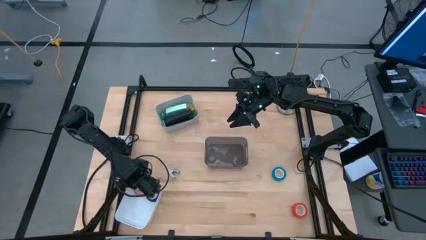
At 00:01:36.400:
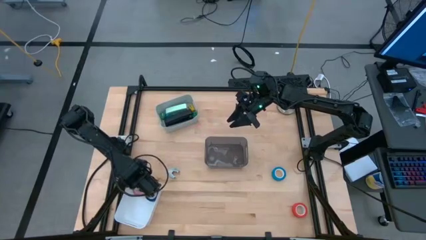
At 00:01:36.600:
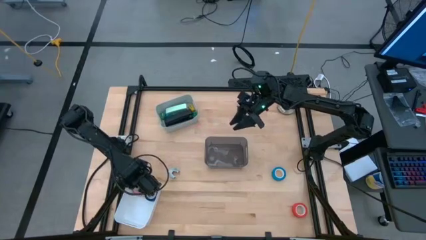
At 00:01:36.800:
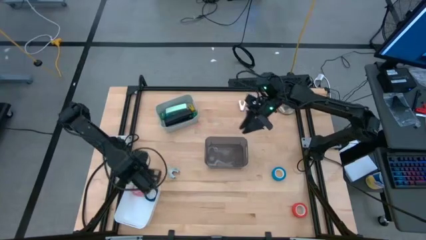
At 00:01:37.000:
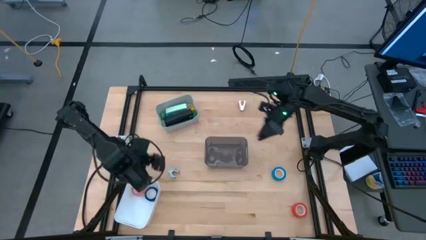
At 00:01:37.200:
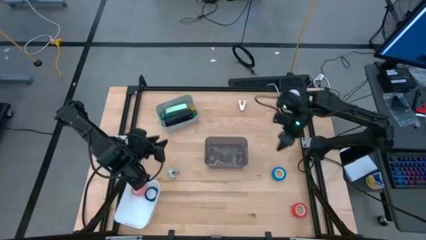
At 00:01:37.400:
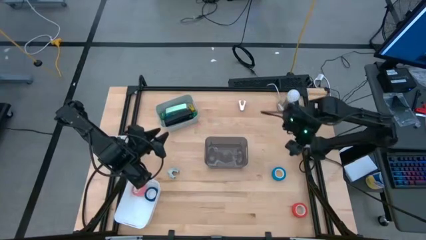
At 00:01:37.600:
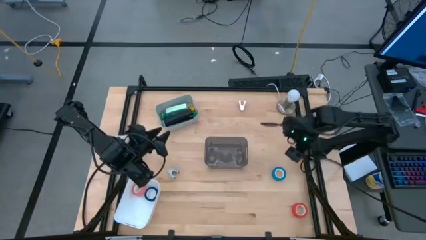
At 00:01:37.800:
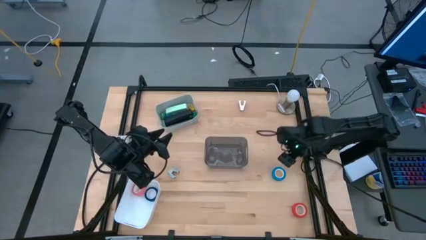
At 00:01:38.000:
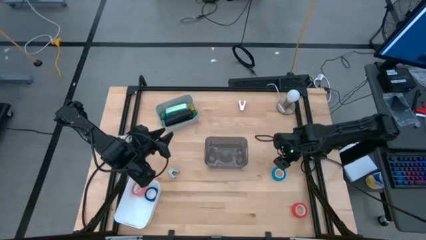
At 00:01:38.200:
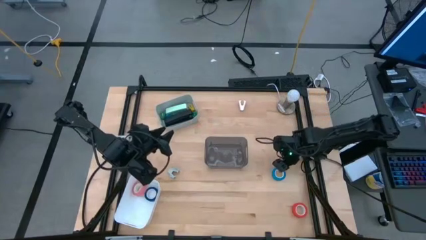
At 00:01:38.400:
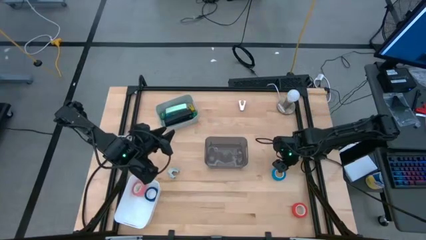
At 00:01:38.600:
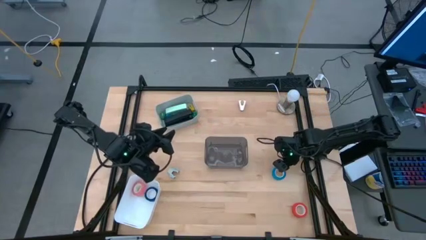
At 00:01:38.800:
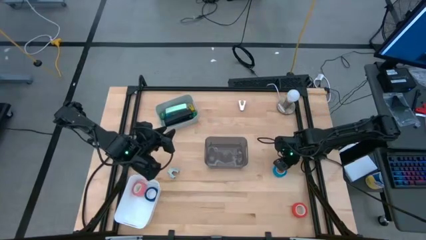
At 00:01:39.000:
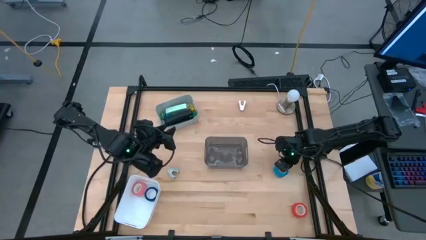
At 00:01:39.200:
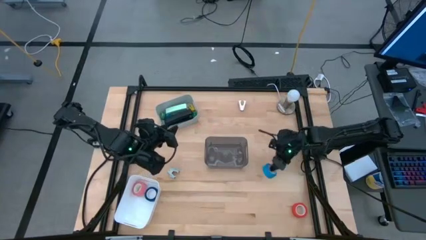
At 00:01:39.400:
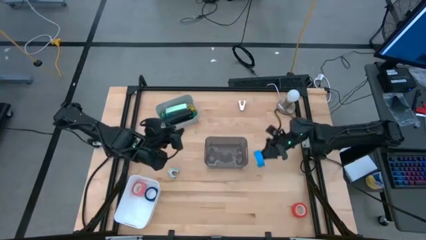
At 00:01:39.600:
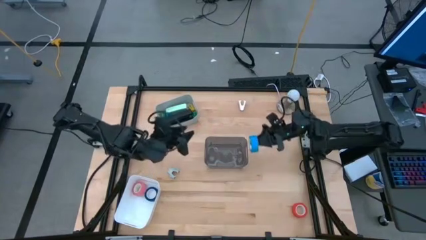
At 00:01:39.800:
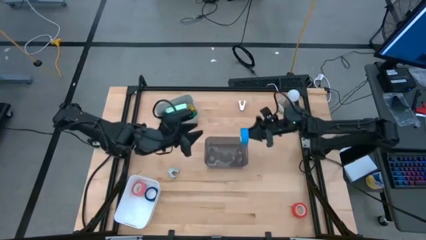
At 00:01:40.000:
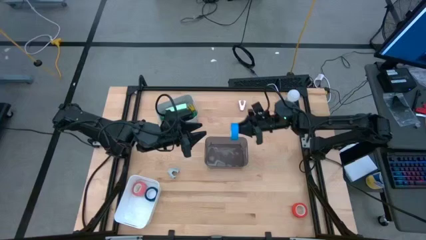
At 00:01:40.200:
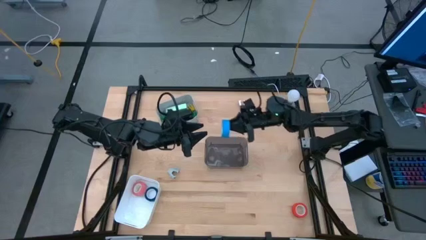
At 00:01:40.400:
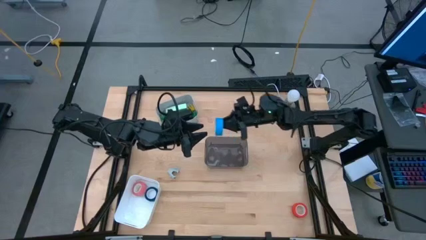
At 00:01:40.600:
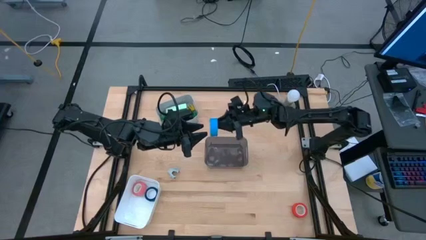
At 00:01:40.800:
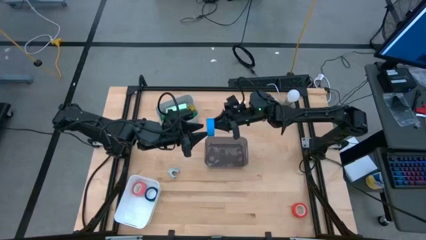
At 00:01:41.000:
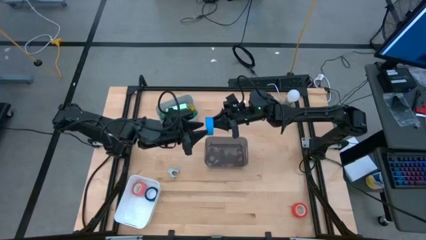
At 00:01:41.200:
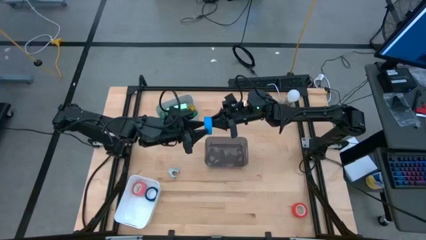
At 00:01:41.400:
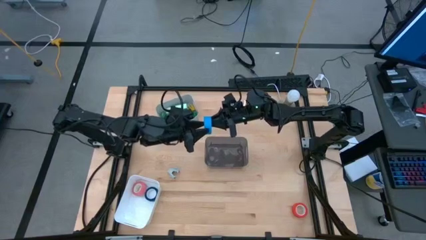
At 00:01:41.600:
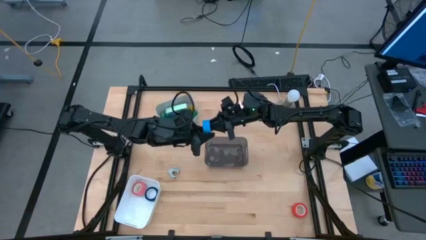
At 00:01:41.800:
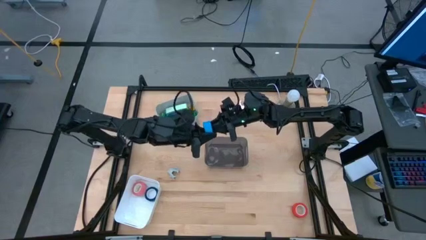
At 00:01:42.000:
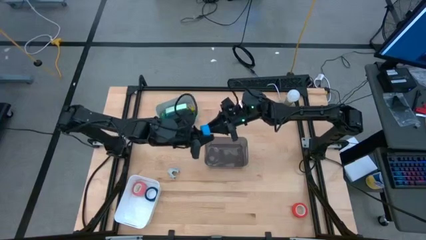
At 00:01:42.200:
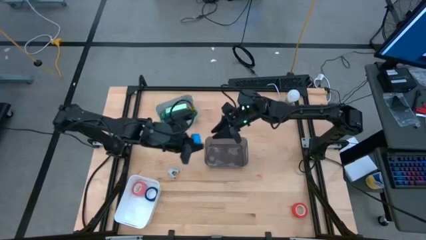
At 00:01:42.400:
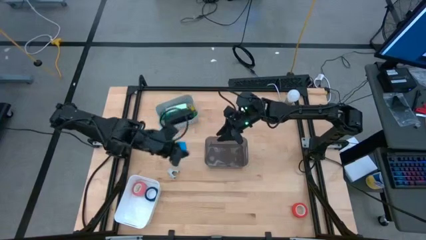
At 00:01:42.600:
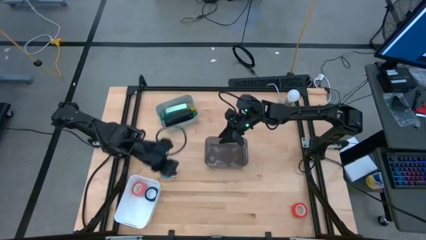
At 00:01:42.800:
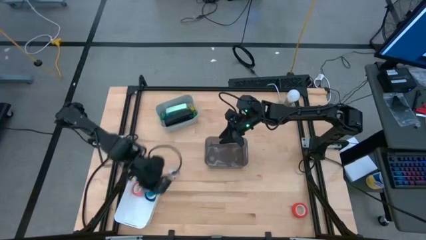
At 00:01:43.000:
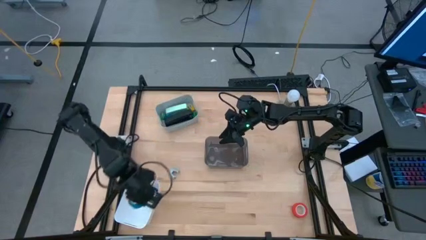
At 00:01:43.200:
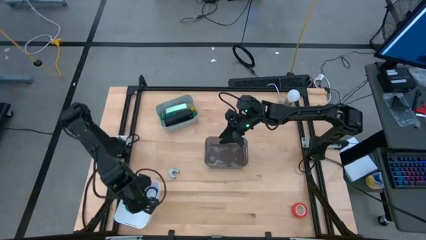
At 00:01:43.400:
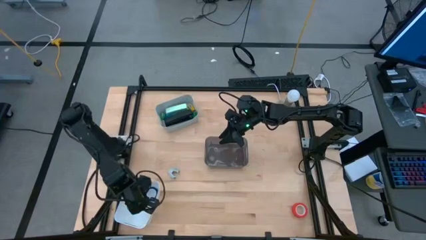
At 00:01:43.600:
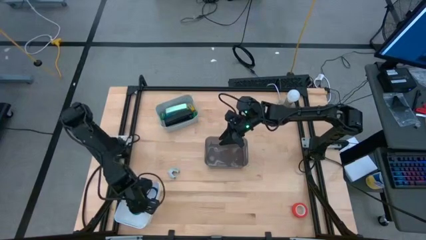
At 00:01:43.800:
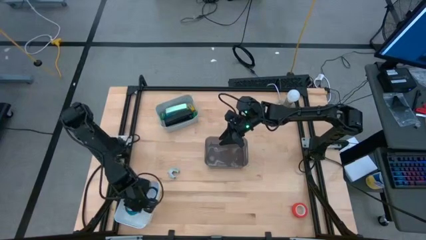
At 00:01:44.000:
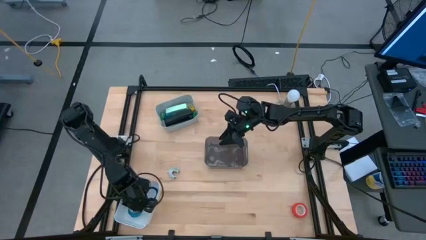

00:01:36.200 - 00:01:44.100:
Task: Pick and place Stapler, Stapler remover, tape
Put the light blue tape into the white bin

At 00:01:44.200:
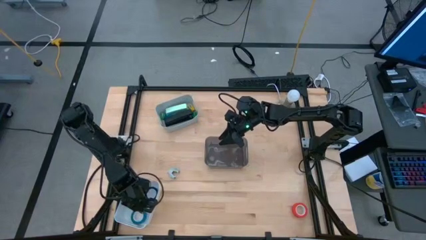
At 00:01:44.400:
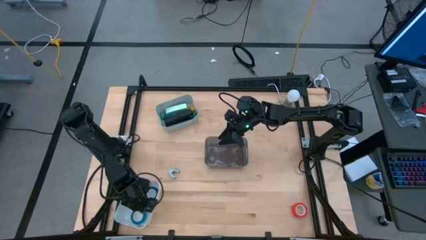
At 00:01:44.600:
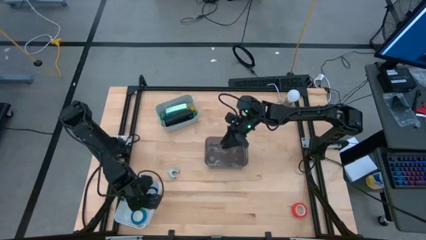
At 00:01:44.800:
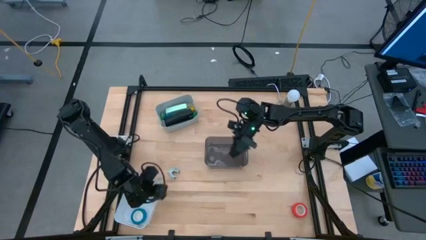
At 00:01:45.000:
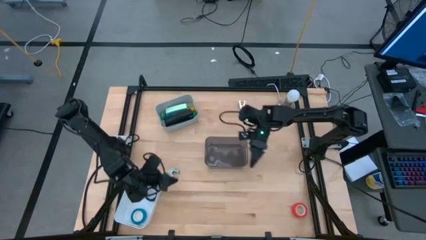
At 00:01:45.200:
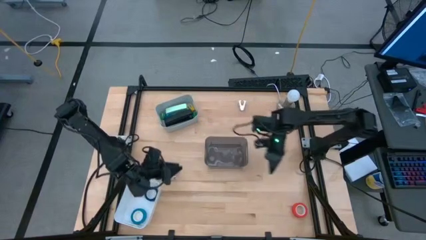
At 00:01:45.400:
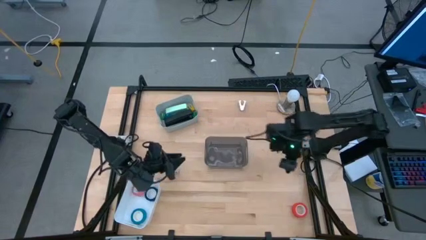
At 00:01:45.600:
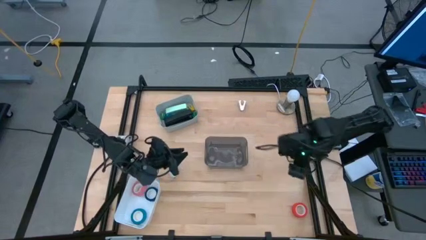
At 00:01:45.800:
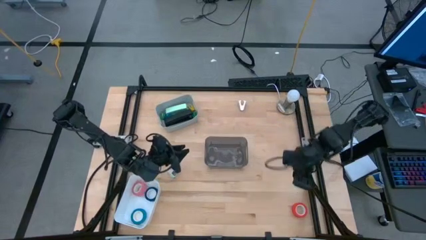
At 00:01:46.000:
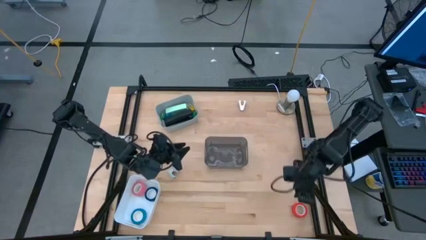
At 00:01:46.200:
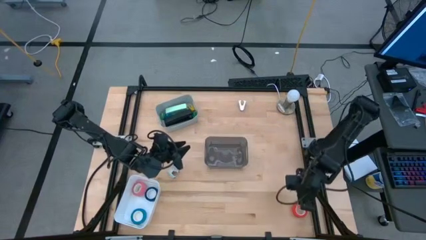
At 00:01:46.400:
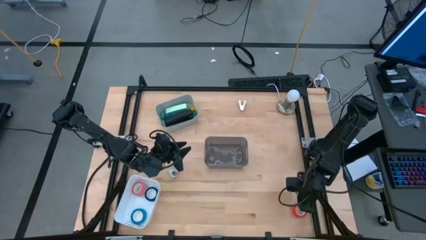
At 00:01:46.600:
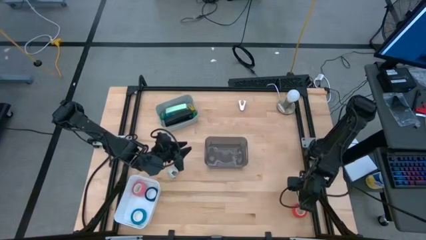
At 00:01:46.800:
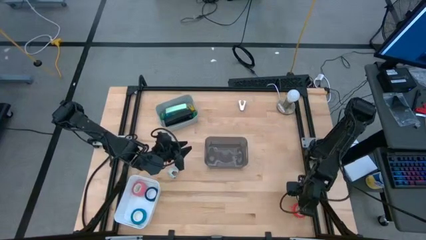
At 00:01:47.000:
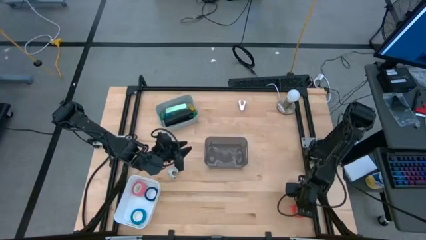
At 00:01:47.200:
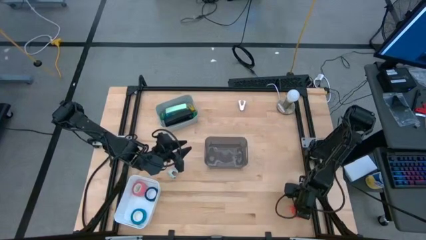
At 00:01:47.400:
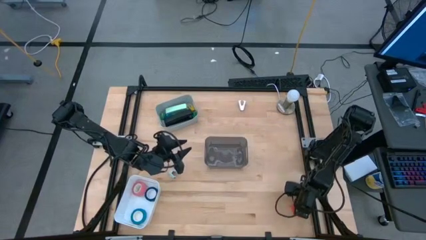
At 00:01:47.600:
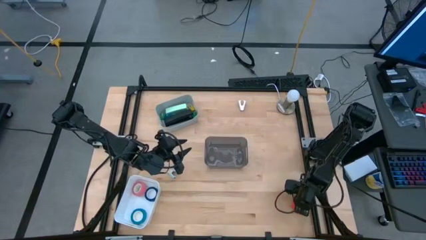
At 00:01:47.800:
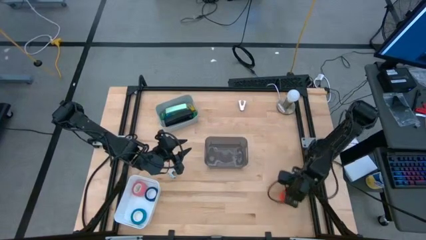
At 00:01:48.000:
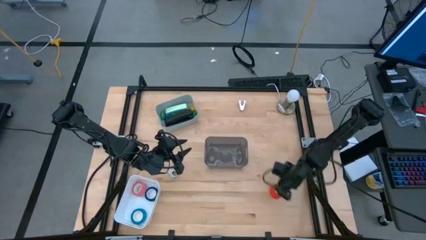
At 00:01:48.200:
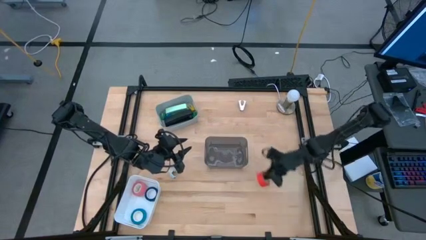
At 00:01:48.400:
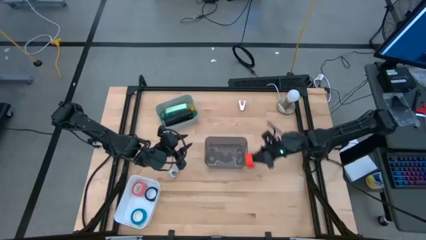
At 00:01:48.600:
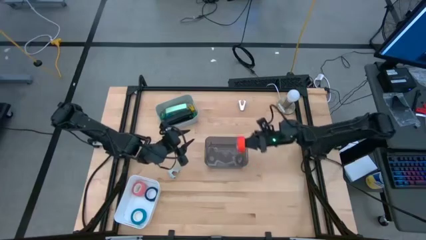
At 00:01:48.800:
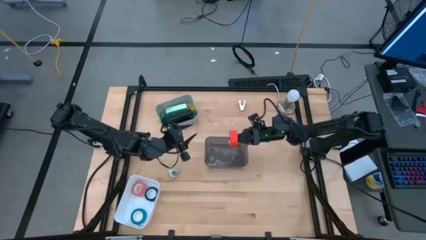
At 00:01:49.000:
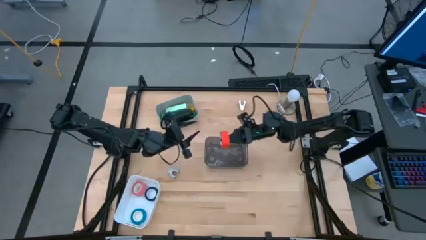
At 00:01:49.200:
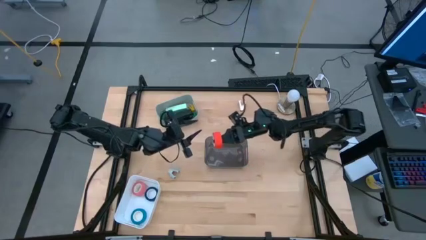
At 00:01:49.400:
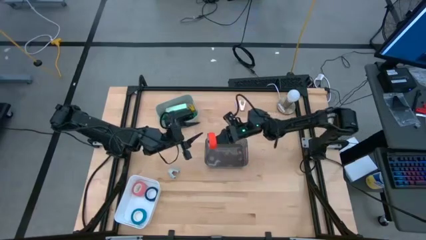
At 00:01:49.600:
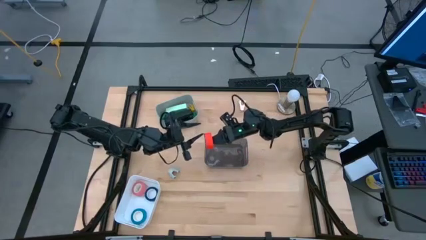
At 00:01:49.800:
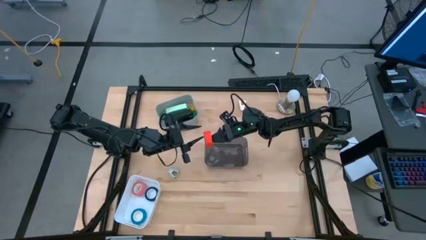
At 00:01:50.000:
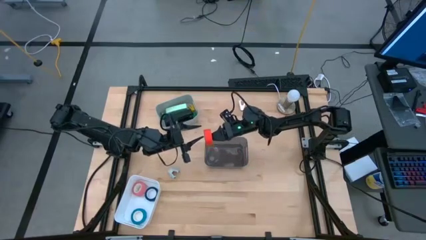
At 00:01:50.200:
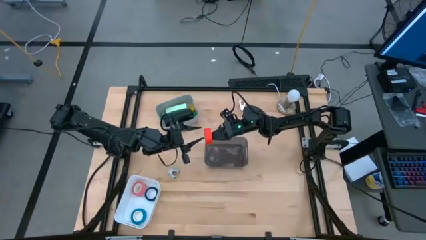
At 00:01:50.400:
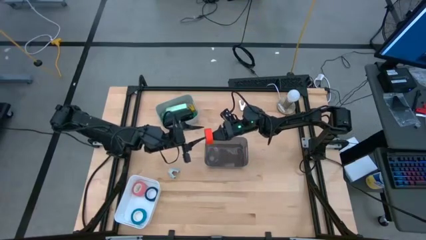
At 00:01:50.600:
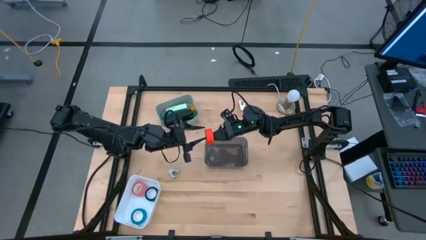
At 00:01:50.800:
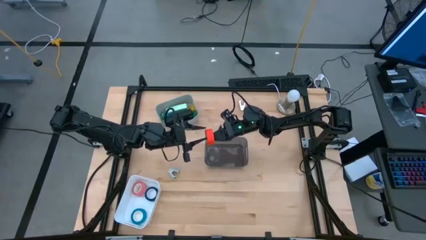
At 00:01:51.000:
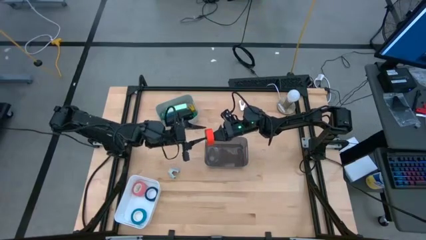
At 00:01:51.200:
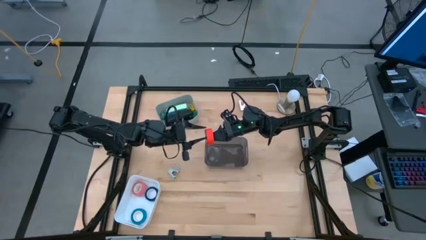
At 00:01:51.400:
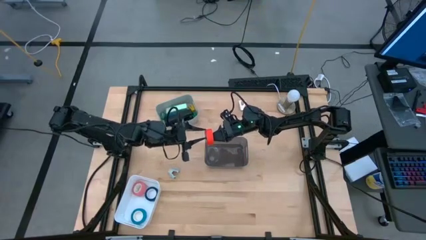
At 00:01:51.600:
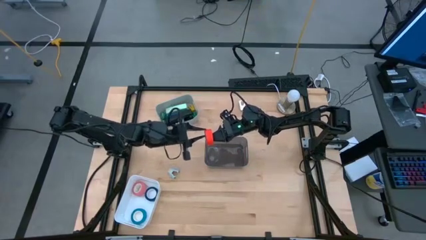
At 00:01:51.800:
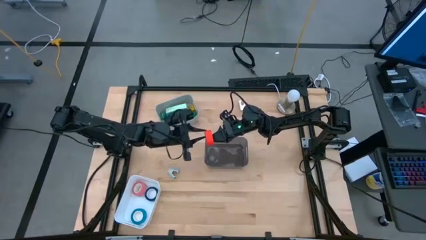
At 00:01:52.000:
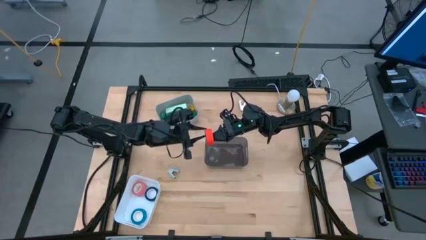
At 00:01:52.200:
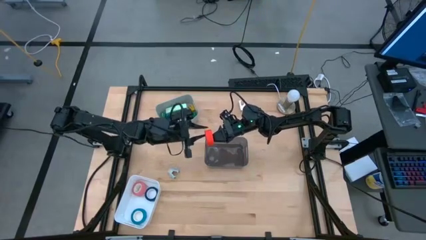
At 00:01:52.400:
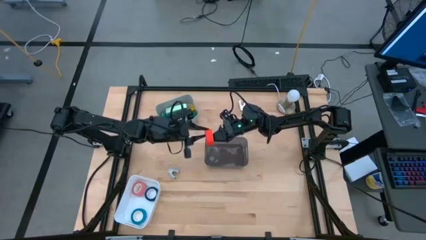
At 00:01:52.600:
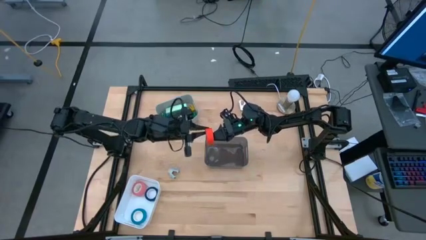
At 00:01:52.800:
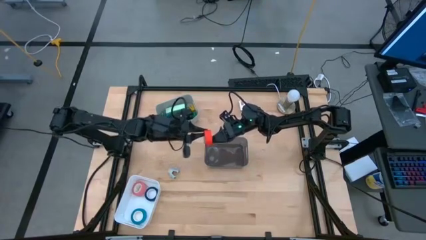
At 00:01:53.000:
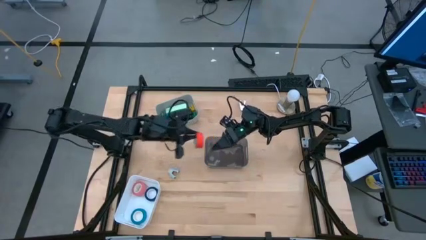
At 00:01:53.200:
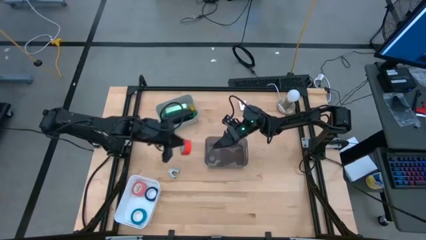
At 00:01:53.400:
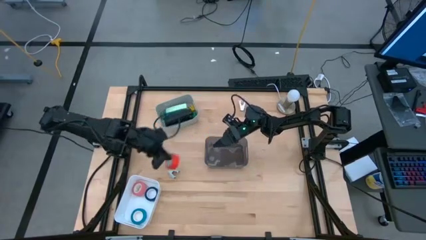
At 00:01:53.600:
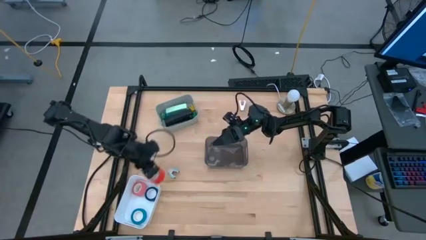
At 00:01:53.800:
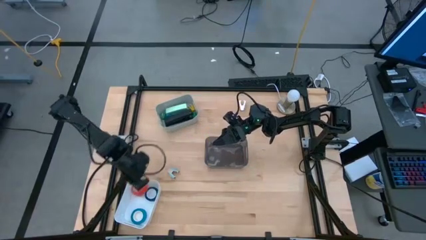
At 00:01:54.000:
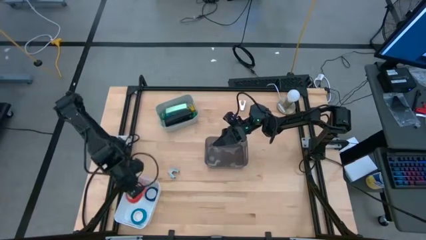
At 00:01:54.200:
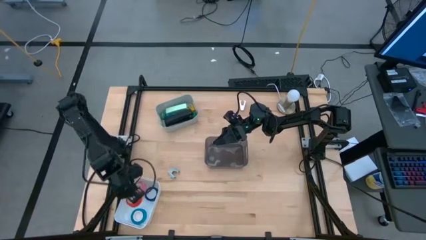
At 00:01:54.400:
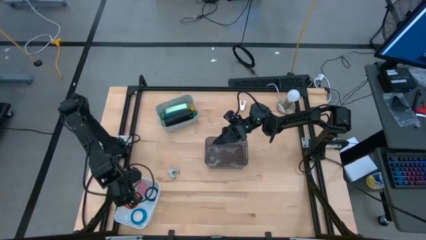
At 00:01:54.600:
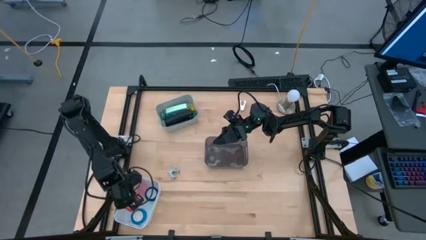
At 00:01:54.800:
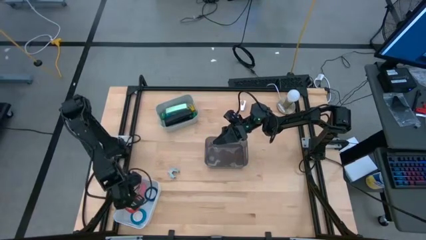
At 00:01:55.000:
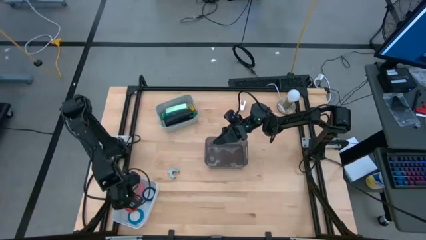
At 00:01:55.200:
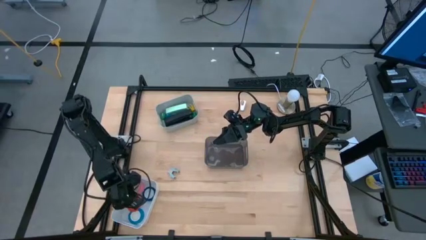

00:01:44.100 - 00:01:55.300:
Put the orange tape into the white bin
